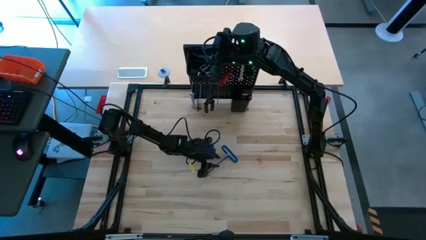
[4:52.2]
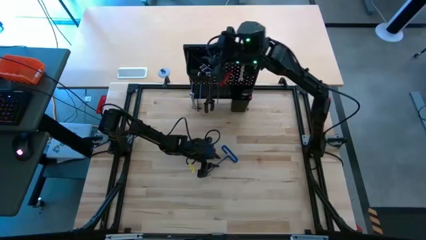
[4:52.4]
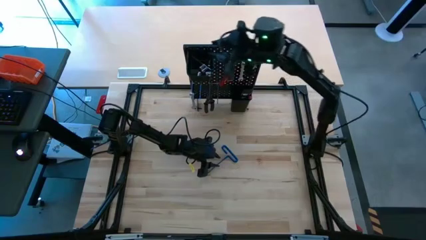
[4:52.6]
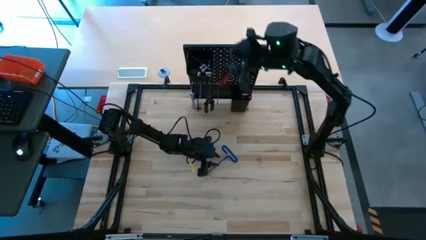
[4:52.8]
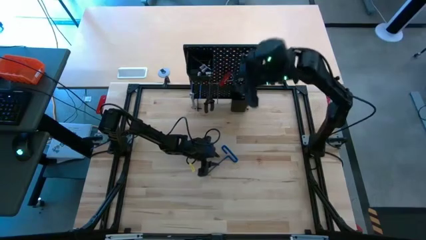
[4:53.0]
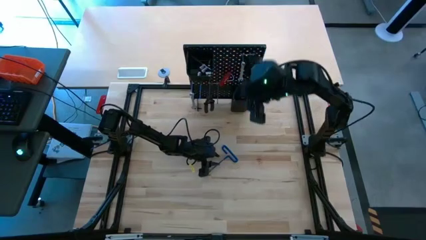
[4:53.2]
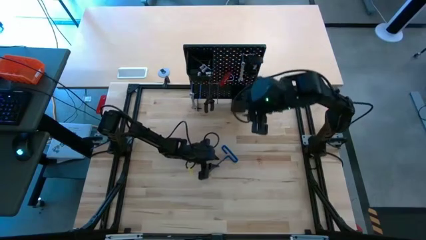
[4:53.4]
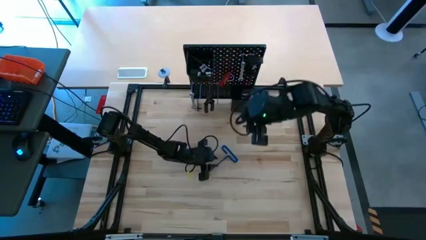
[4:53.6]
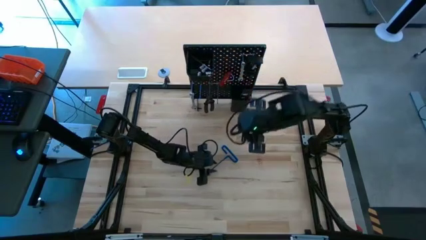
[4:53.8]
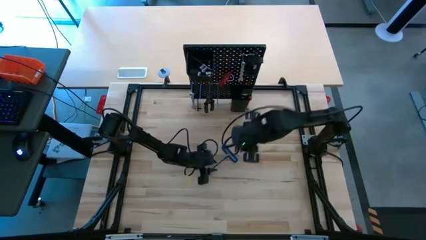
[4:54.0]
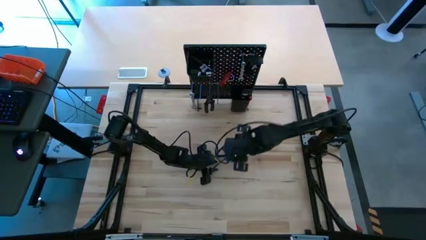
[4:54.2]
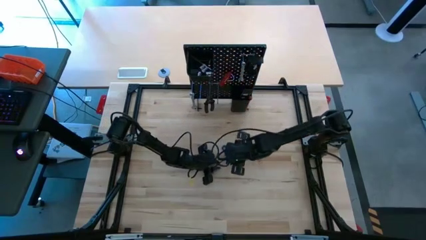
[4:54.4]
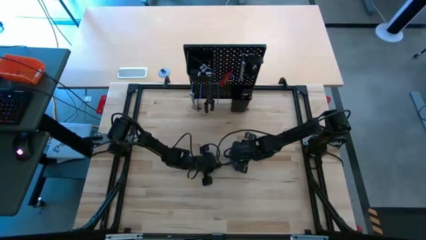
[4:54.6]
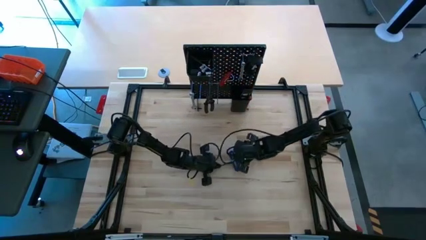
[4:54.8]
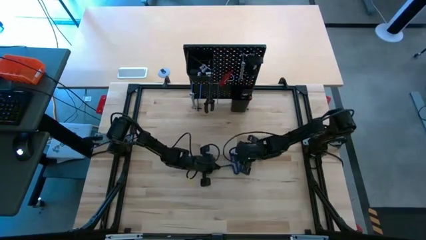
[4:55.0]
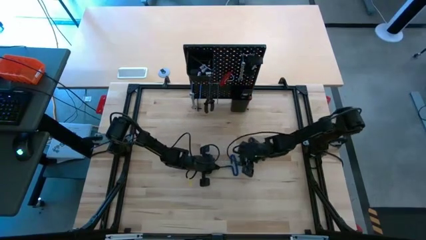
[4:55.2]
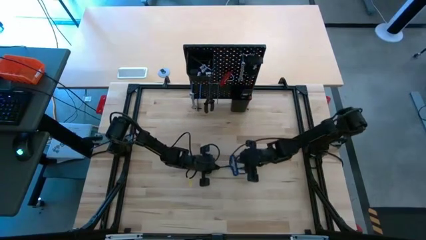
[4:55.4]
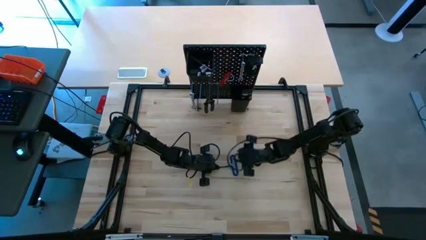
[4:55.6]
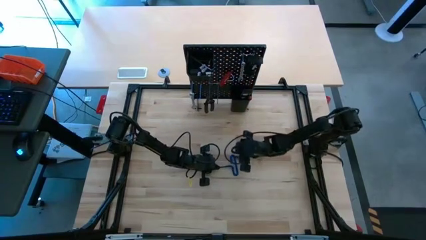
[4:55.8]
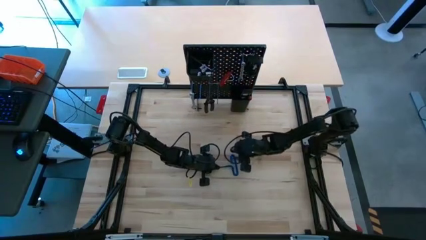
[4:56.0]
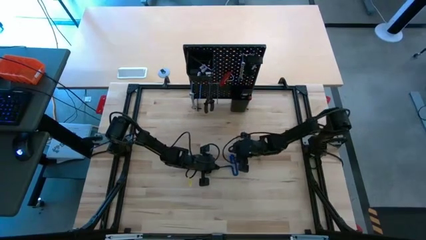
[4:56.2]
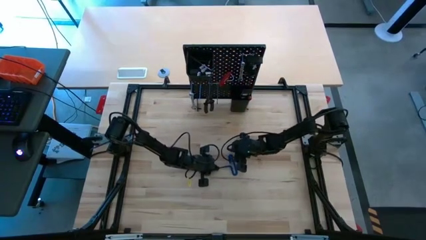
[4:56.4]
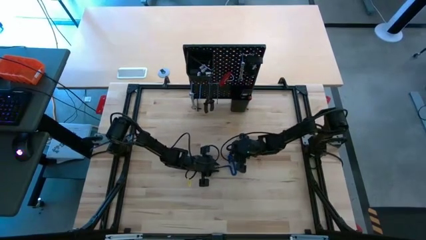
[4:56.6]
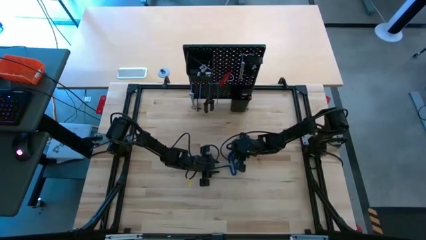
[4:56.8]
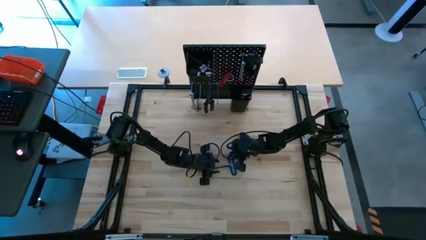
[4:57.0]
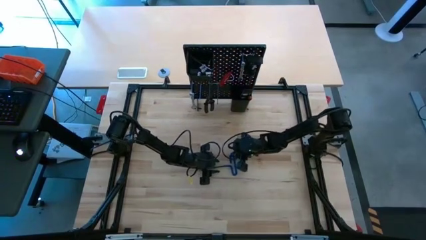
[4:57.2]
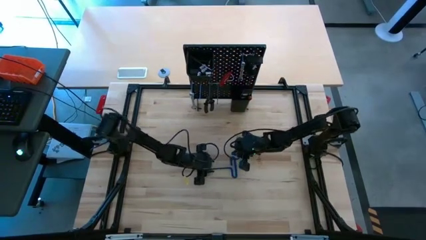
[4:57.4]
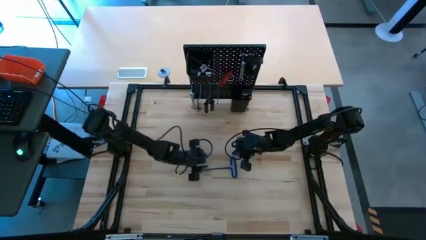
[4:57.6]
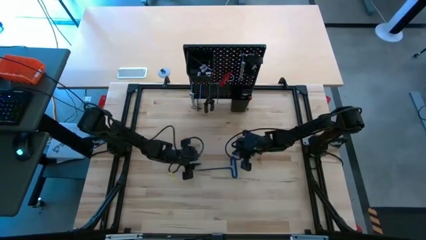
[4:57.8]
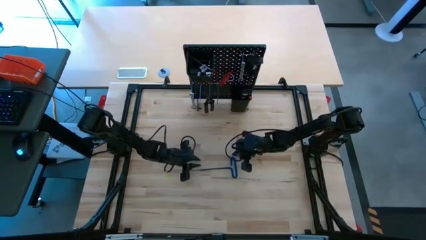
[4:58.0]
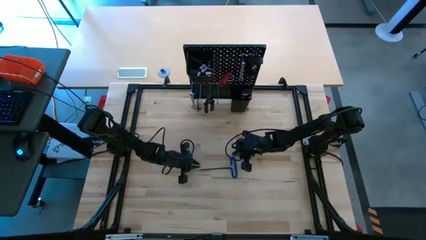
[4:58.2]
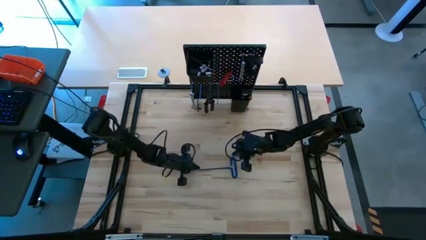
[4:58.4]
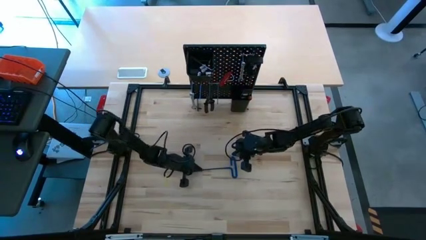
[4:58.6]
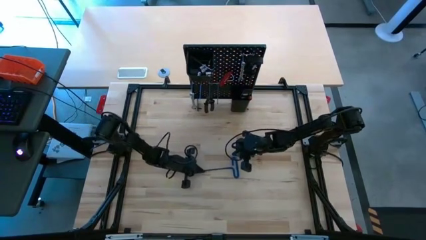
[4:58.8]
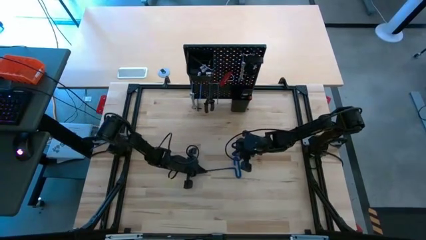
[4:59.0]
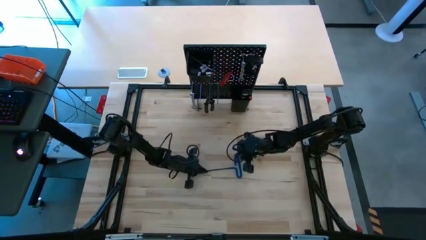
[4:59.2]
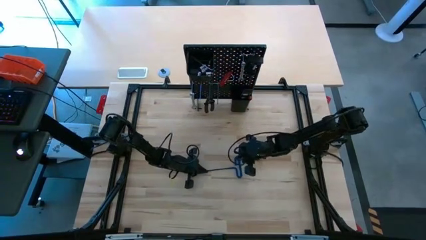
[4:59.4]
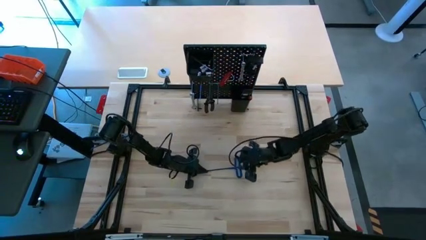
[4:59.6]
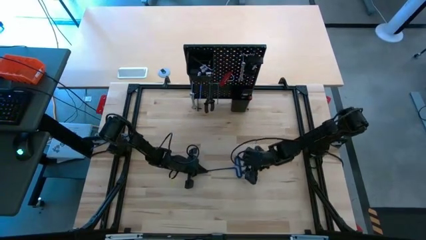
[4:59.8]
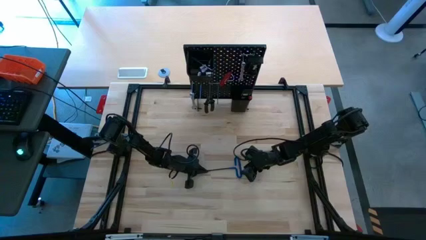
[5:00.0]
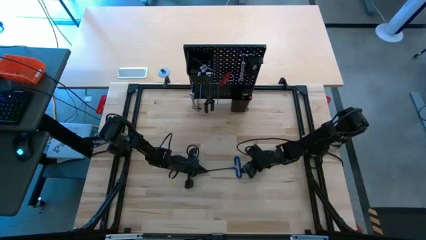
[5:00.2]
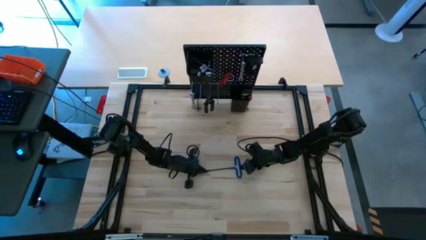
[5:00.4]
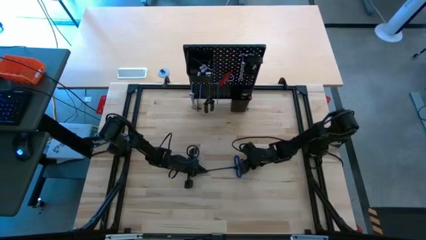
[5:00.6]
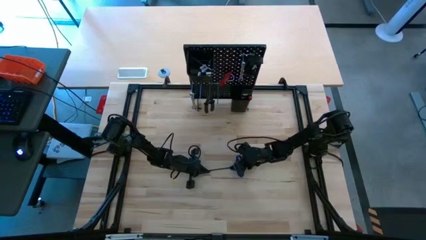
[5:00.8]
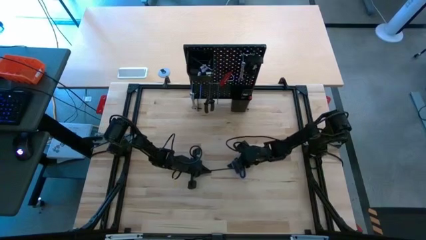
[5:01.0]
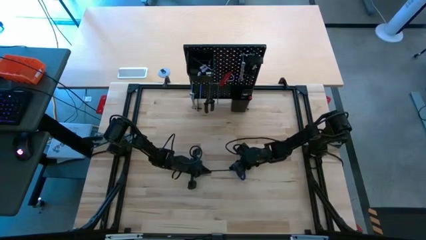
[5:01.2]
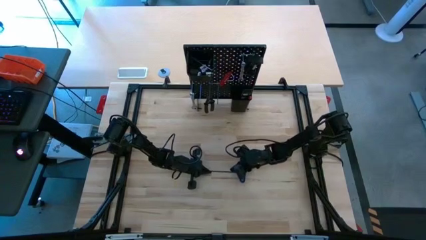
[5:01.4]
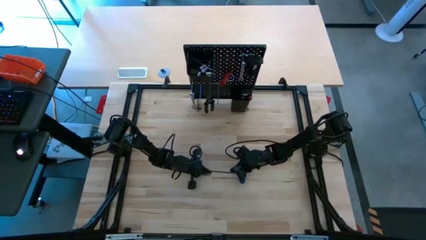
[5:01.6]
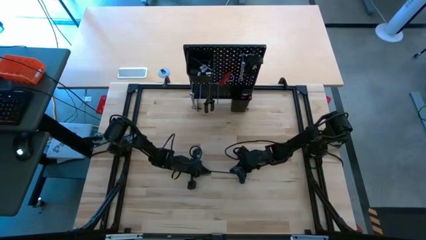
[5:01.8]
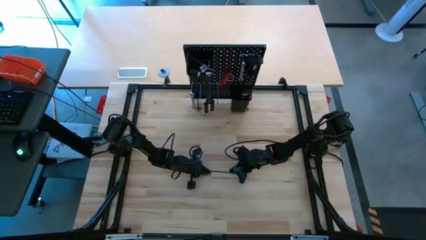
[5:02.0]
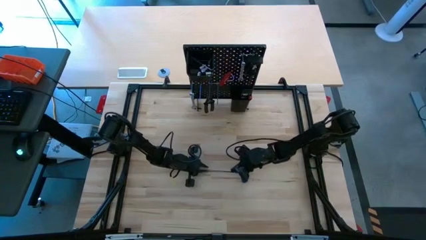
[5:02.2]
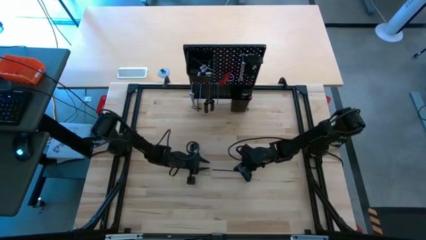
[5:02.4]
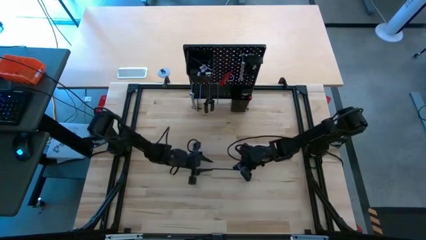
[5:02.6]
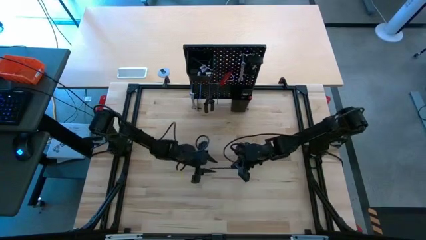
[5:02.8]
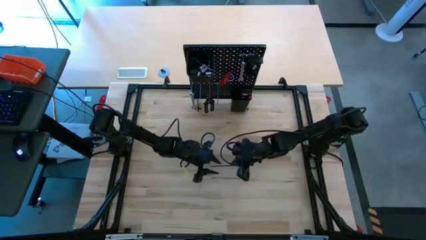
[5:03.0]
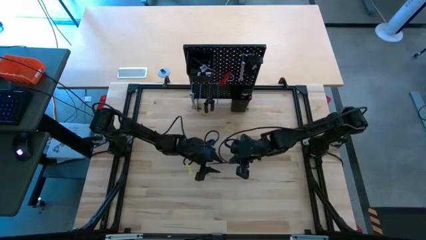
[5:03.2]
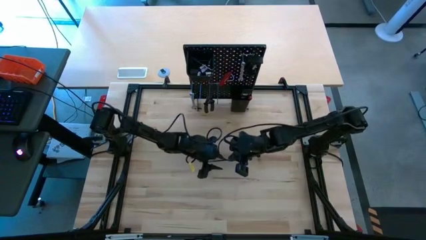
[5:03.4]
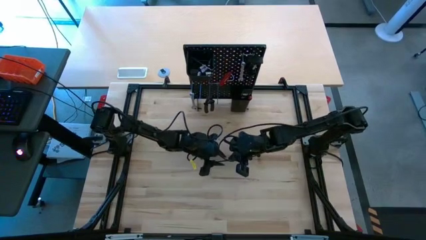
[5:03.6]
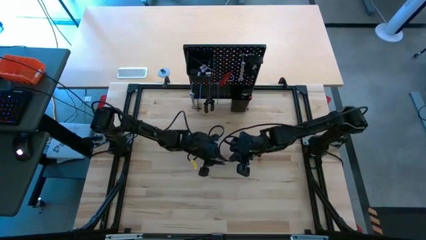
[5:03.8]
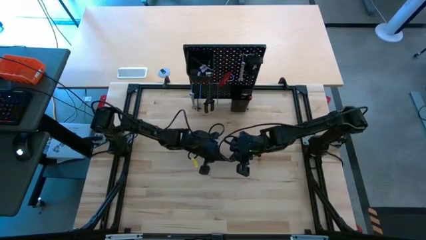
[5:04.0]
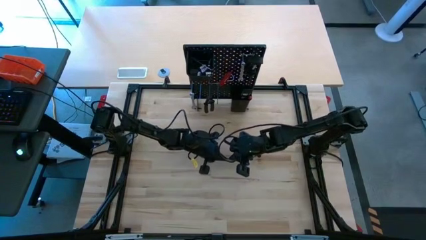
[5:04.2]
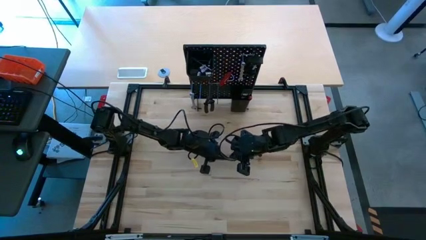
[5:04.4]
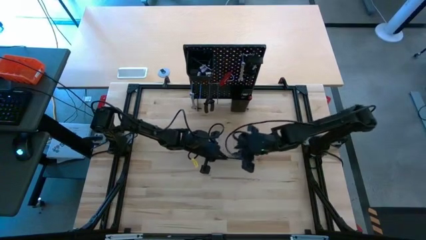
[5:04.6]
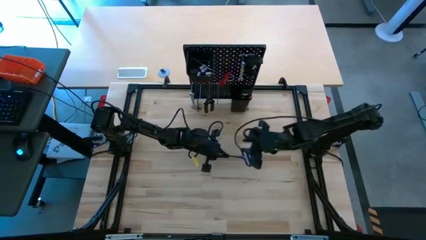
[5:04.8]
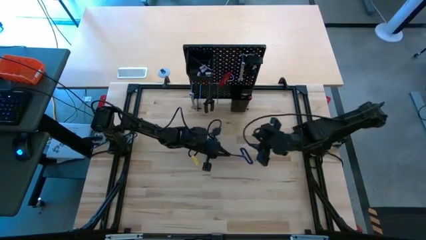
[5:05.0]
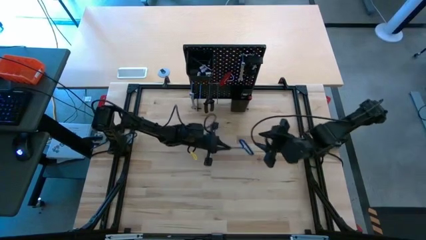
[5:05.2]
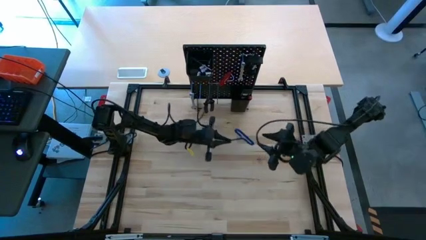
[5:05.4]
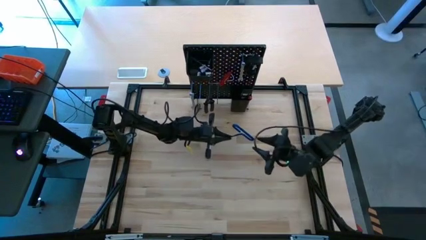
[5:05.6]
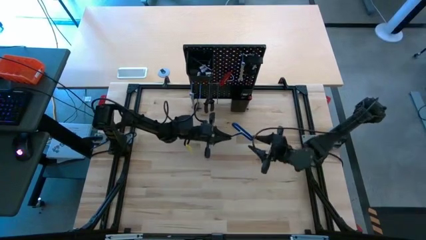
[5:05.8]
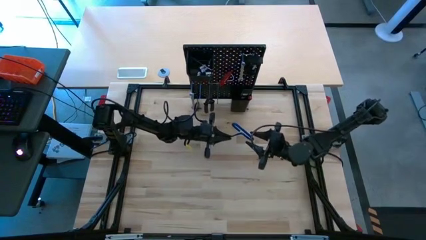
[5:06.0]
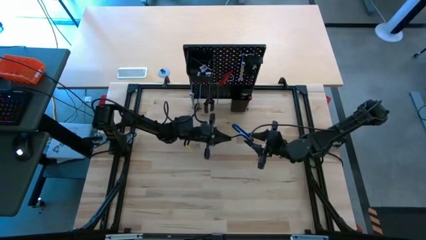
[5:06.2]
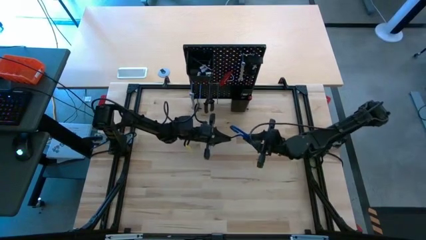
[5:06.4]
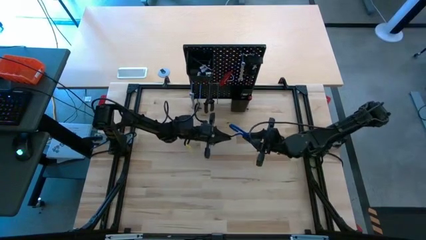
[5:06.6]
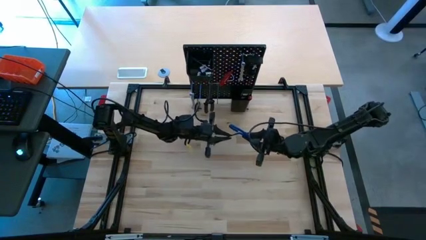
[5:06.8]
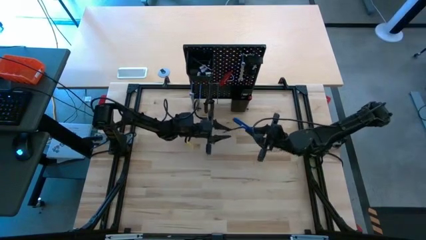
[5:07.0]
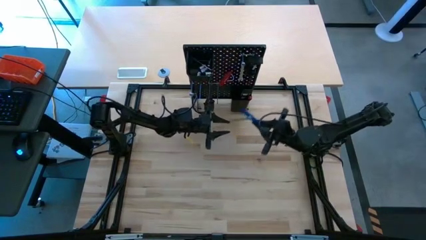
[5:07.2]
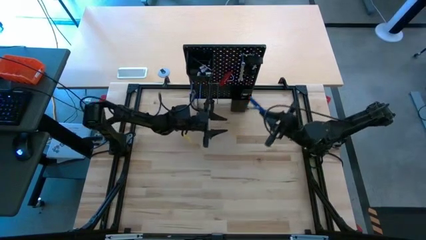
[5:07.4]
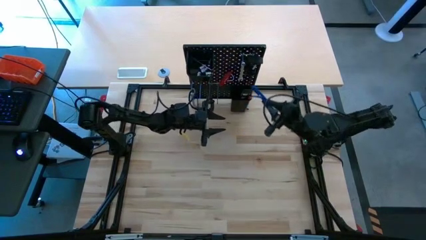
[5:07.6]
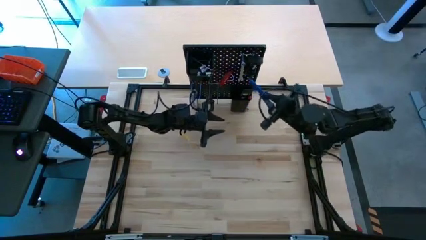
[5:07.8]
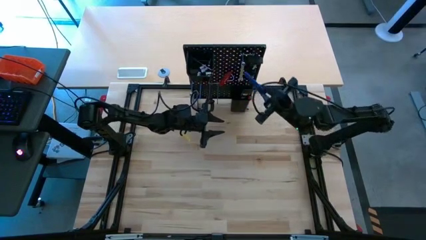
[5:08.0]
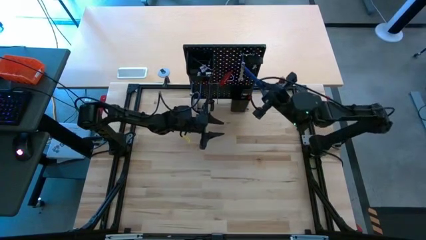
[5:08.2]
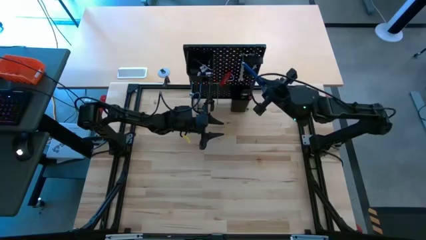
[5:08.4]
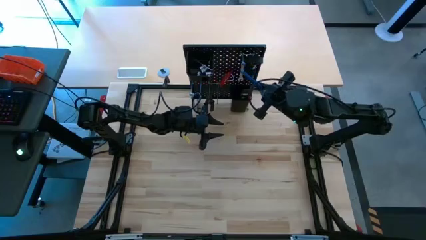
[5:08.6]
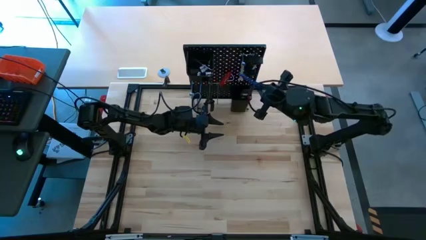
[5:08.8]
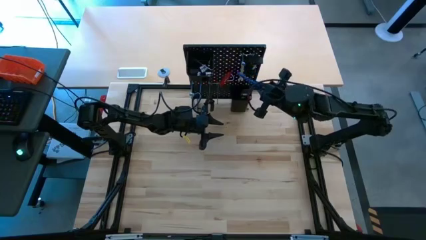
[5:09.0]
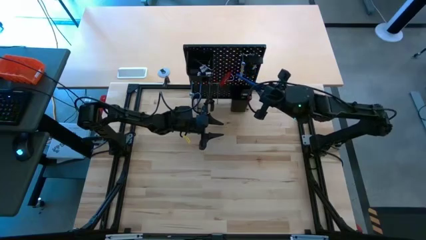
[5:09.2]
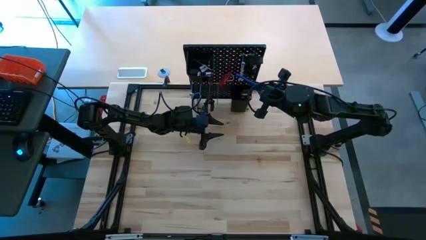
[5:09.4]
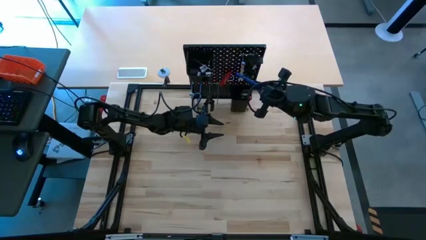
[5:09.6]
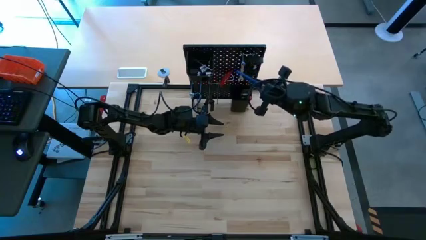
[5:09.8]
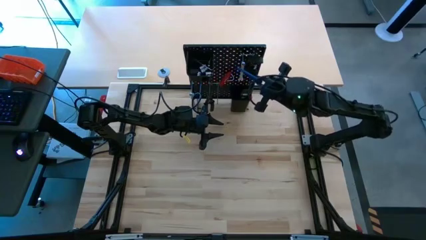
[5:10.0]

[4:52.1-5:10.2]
Task: Hang tools onto peg board
Put the pick tool into the bin on the pegboard
